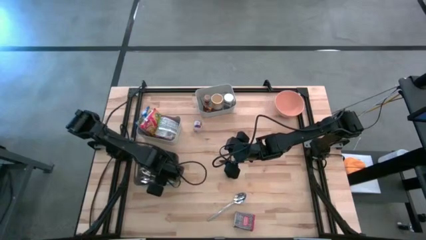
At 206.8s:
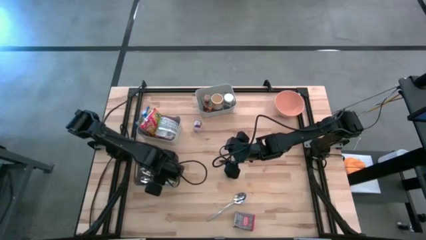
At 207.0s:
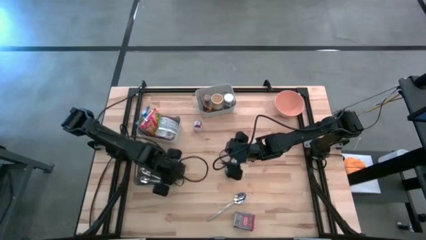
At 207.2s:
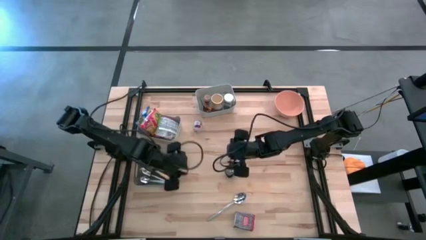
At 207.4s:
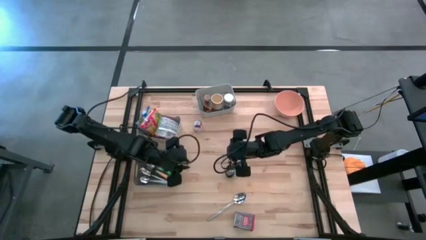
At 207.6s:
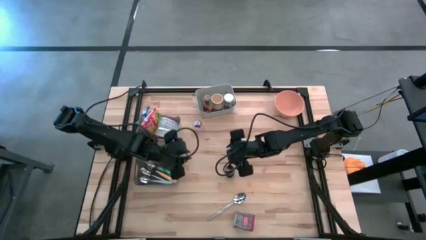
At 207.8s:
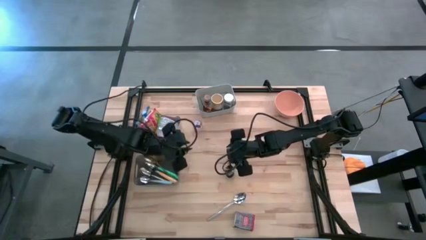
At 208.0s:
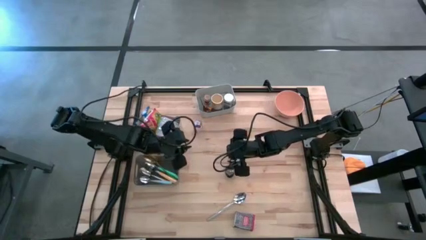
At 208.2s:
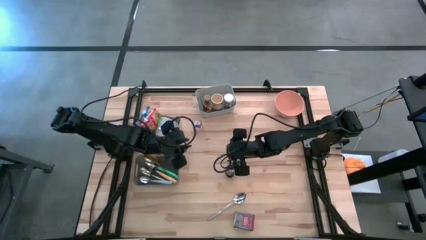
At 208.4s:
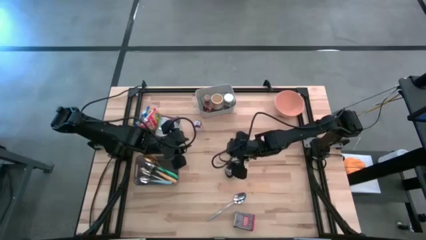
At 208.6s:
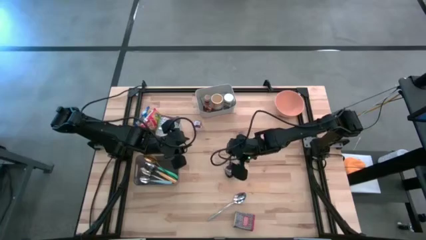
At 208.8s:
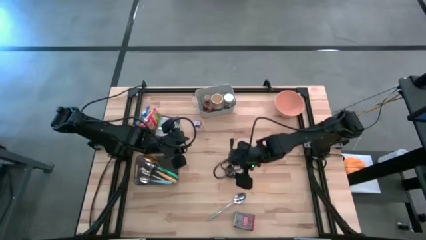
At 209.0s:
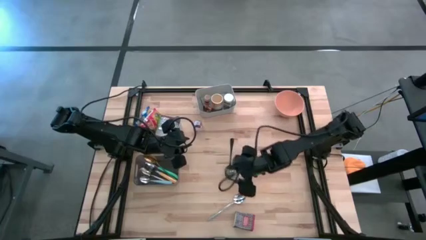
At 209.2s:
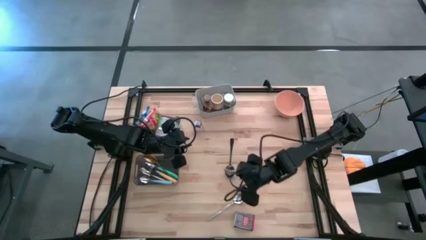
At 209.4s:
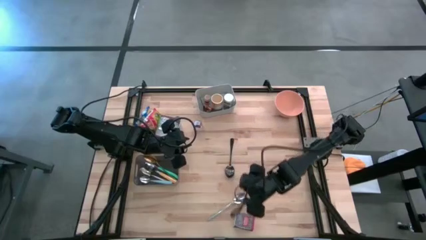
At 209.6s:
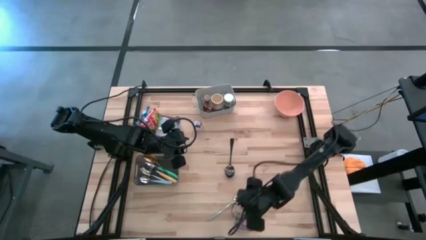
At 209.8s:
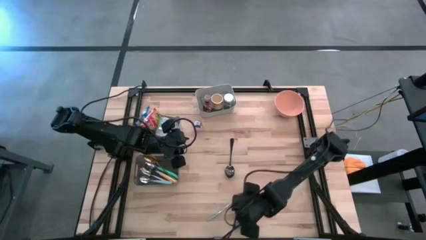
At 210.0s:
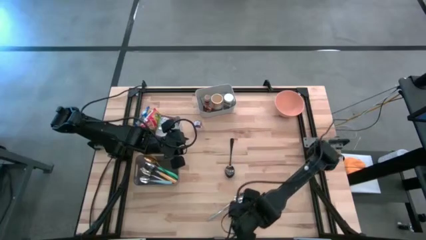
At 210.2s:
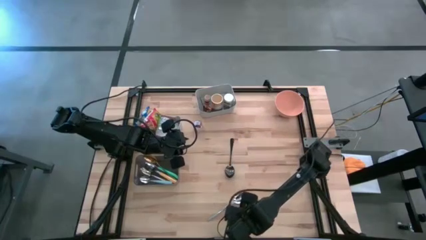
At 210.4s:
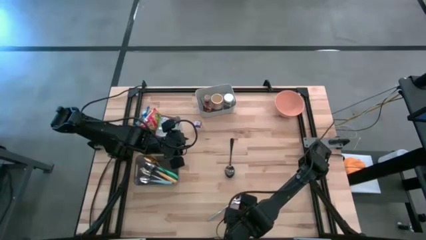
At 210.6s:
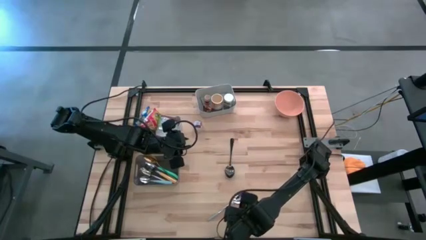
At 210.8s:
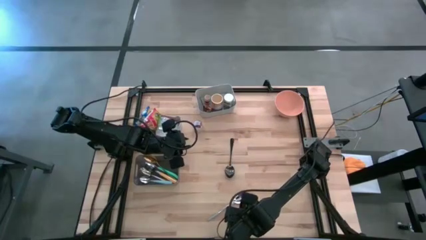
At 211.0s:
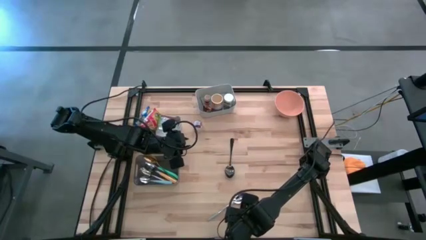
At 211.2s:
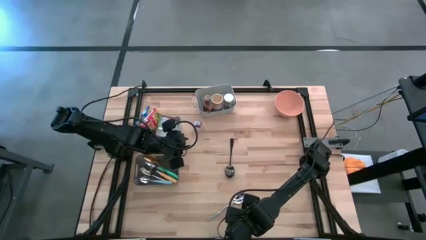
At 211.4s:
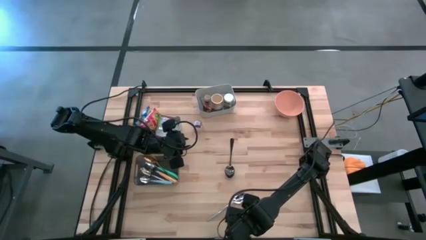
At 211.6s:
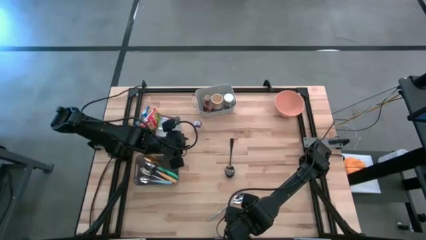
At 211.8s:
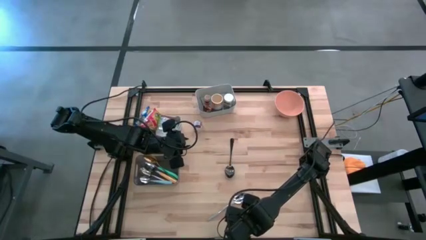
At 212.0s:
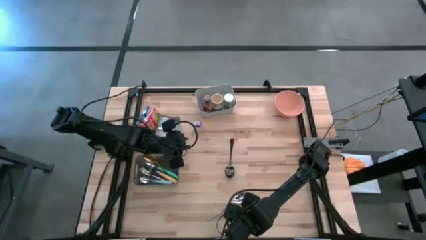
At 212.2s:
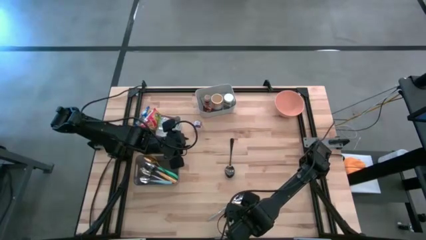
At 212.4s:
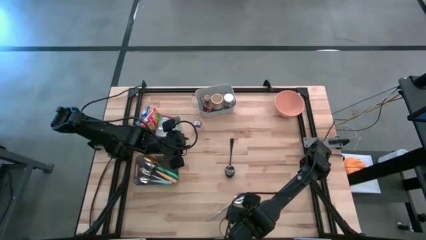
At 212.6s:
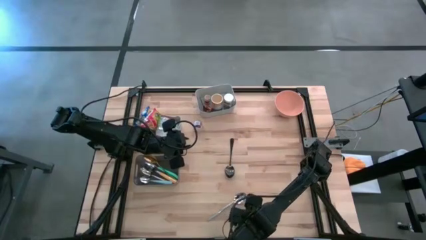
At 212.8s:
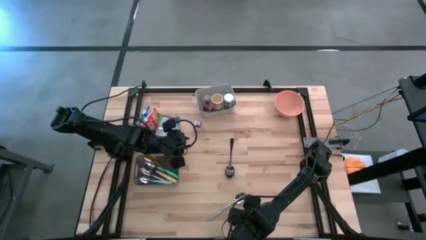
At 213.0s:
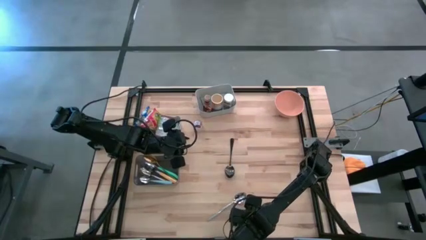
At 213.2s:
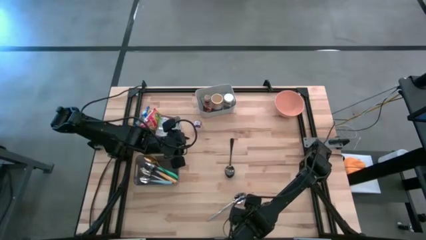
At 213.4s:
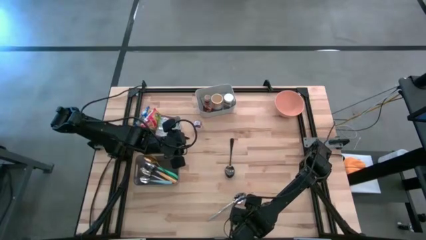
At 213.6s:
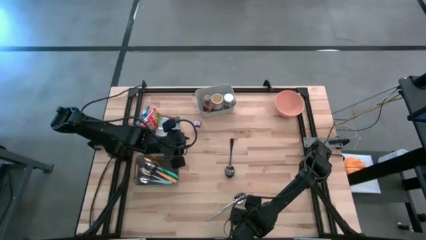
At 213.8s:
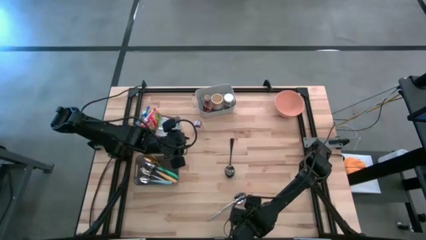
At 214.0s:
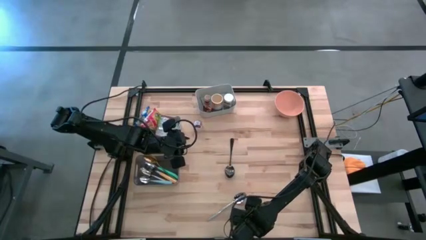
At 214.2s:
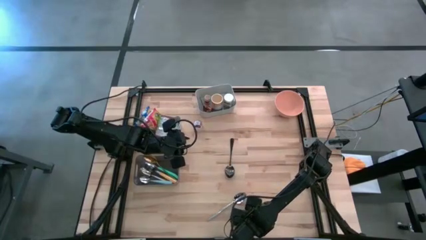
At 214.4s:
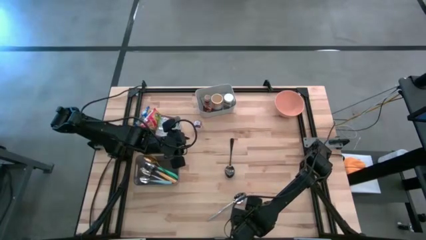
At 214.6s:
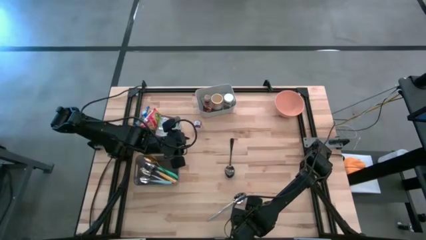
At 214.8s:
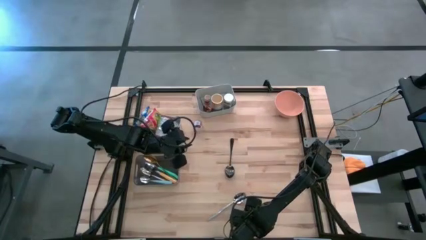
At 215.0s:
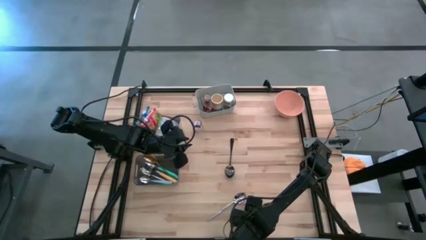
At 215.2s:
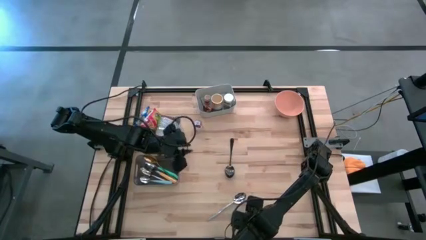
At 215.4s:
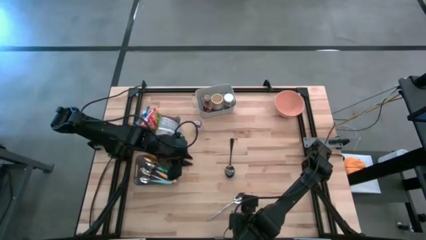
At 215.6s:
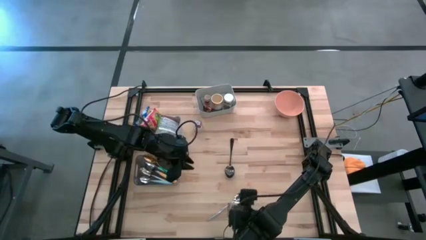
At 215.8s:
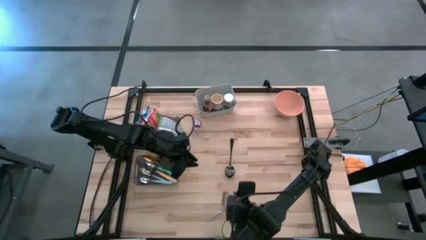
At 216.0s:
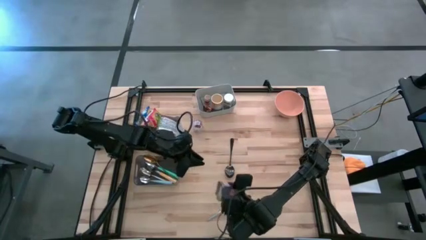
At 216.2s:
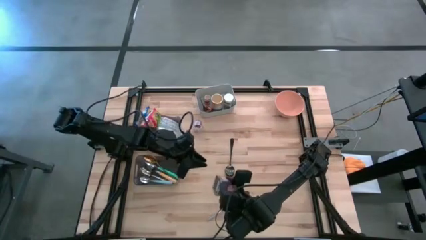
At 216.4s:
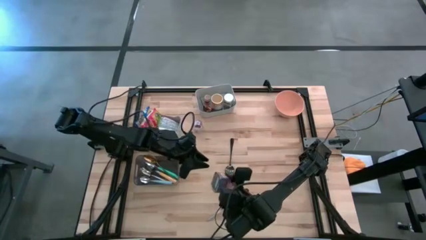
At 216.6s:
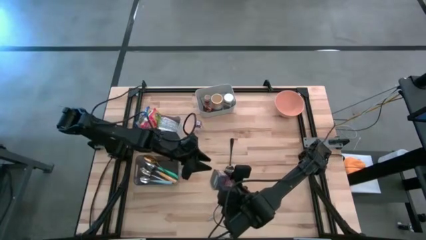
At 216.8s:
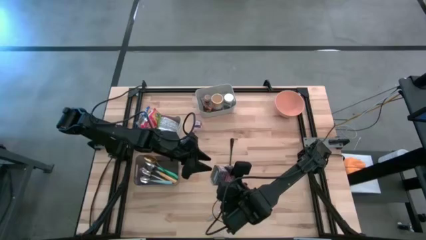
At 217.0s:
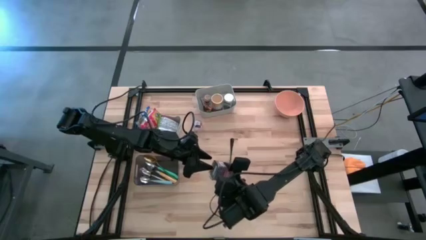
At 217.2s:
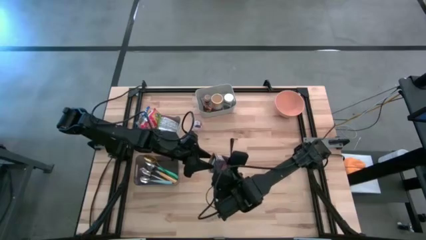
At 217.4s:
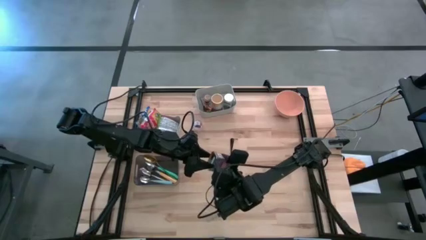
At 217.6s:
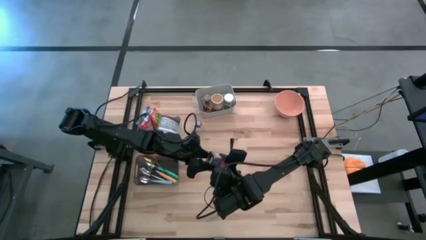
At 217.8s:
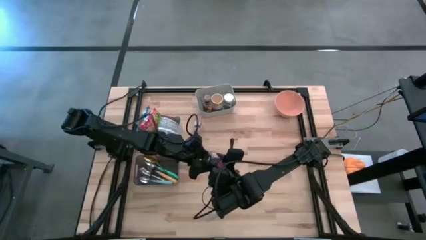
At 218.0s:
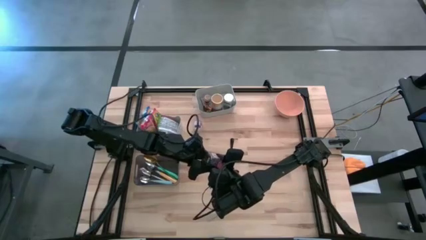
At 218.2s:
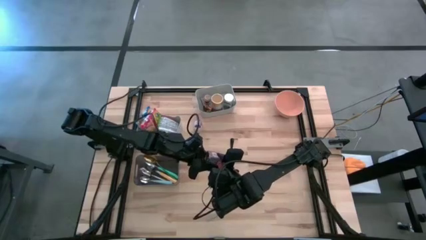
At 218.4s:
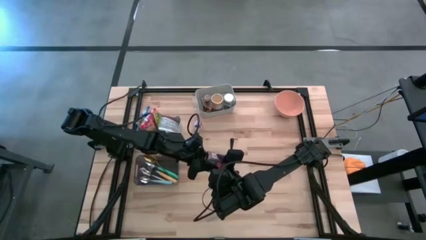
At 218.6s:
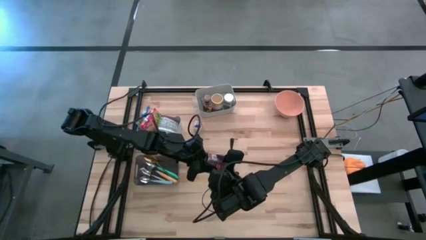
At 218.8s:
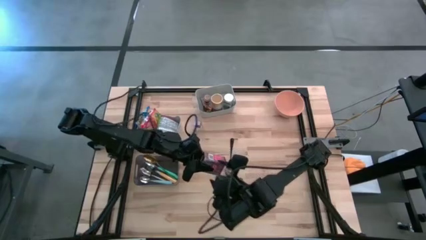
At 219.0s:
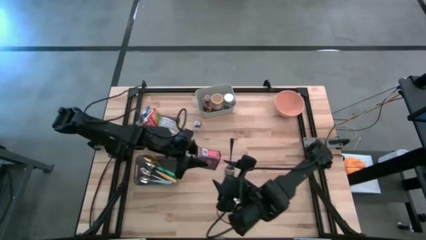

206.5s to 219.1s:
Put the red spice can into the top gray bin
